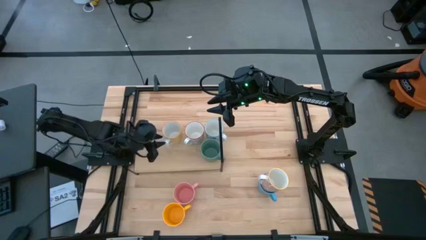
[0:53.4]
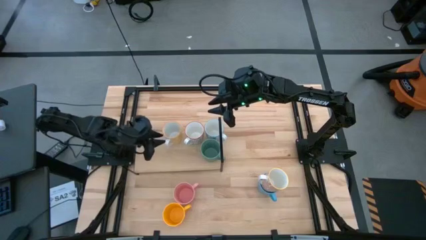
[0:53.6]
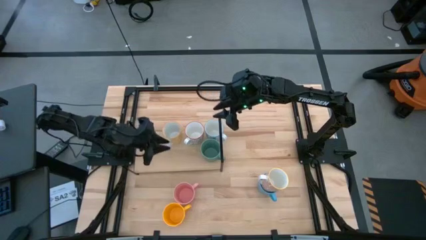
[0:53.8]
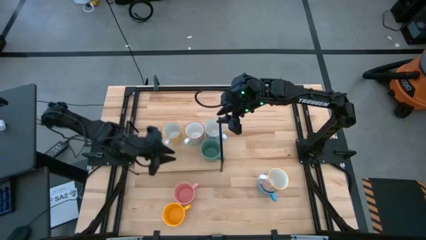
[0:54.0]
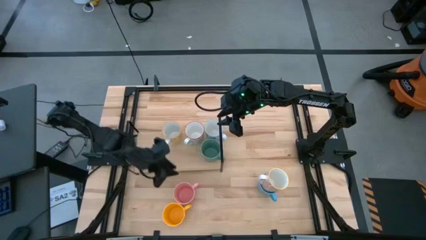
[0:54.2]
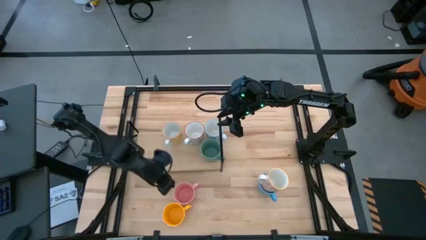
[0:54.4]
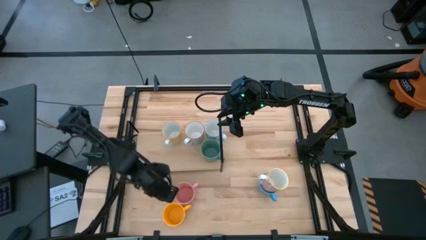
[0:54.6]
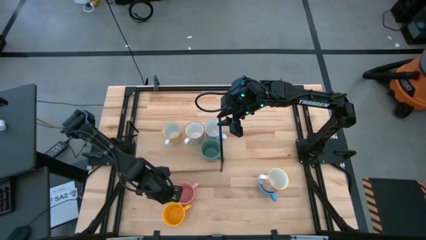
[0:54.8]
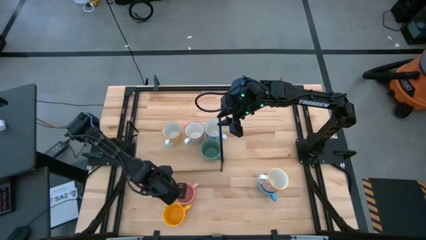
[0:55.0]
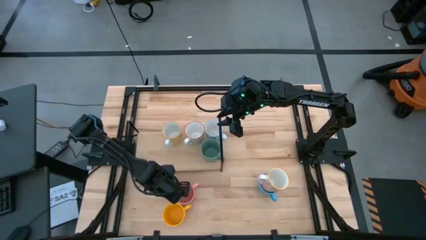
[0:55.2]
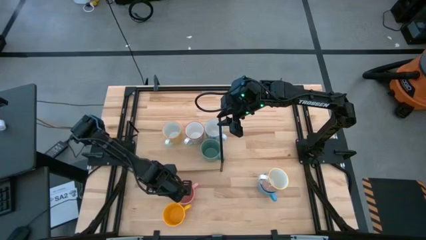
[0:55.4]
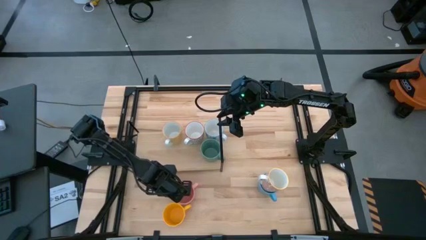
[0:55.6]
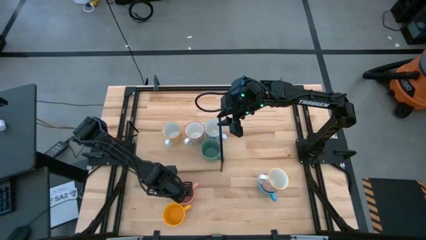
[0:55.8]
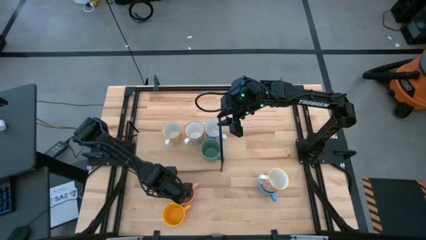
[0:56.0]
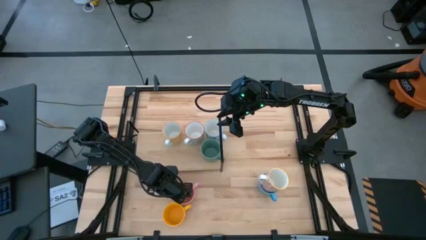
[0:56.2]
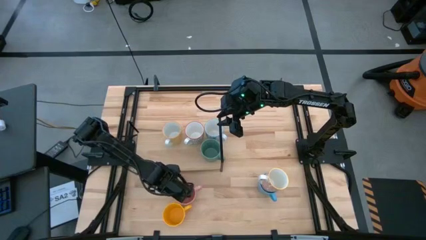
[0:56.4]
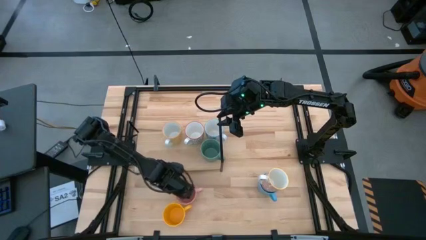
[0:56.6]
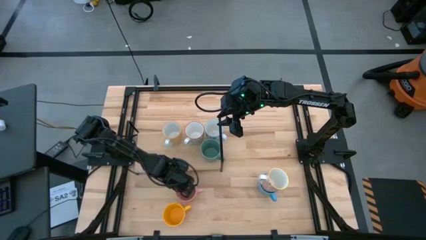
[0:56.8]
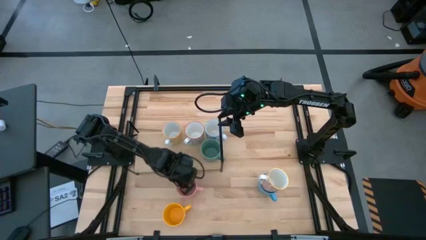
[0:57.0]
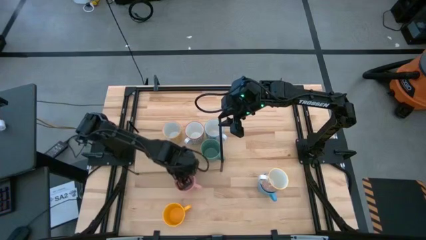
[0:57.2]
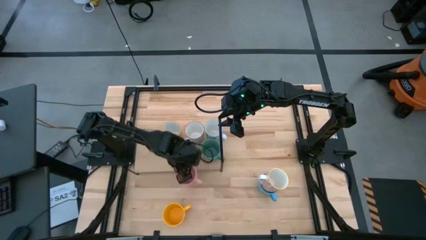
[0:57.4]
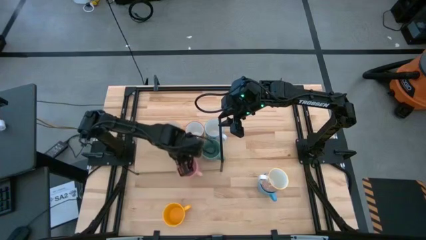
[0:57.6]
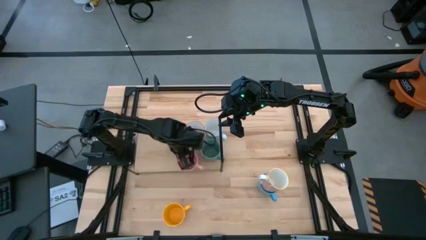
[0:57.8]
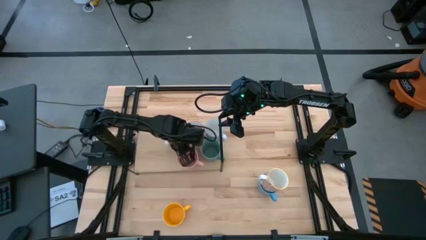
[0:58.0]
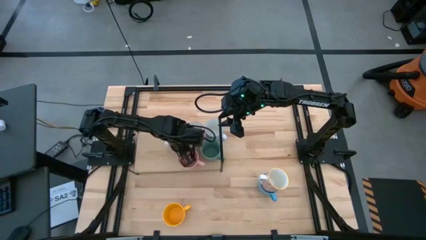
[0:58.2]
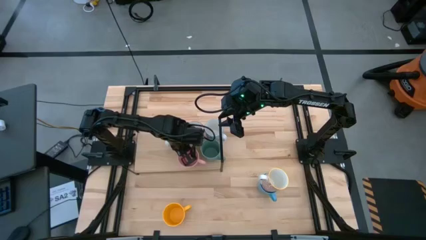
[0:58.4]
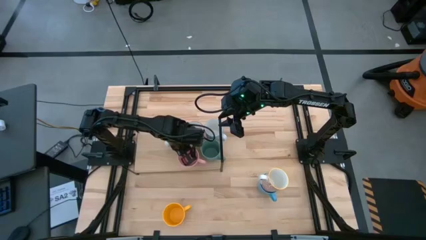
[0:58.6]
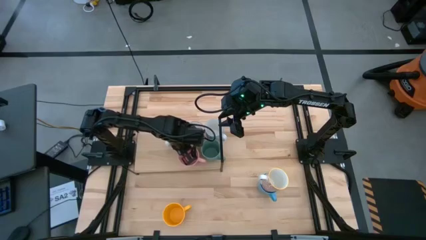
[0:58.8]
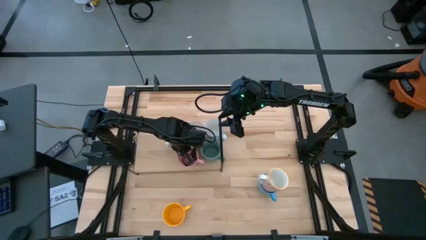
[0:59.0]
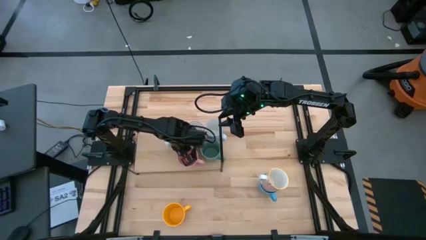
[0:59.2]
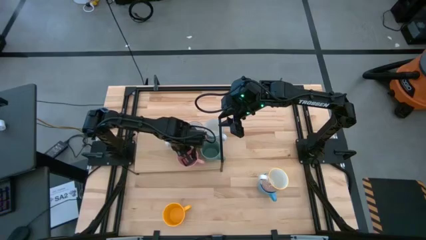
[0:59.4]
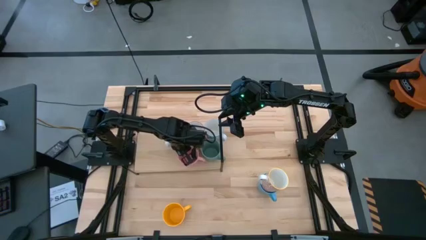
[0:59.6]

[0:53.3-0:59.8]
Task: Place coffee mugs
Put the pink mug on the shelf

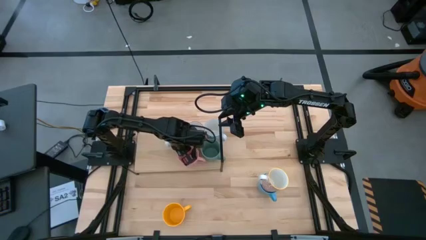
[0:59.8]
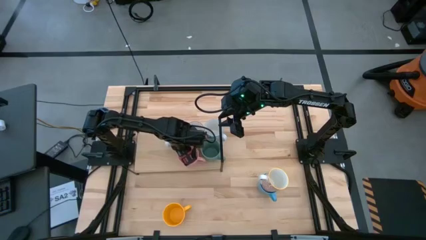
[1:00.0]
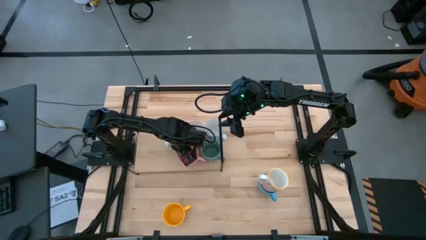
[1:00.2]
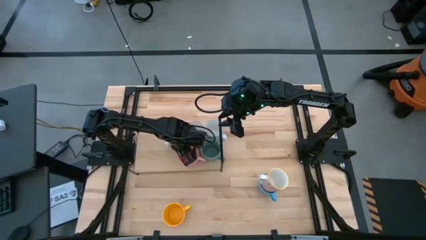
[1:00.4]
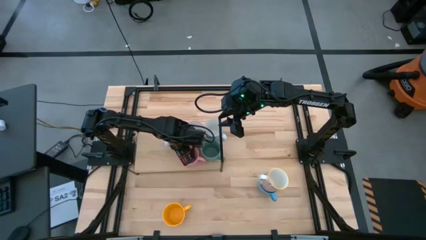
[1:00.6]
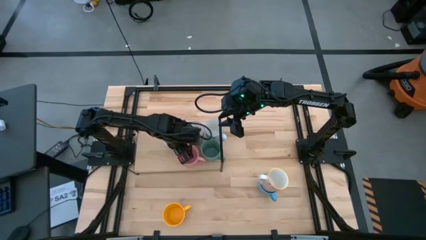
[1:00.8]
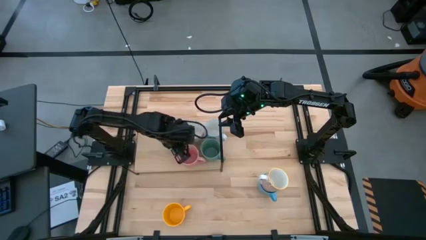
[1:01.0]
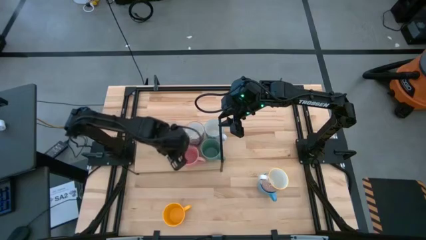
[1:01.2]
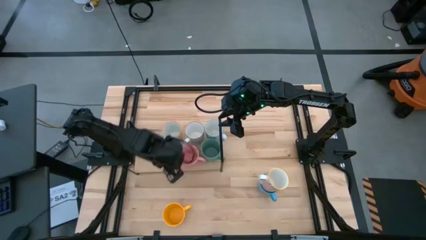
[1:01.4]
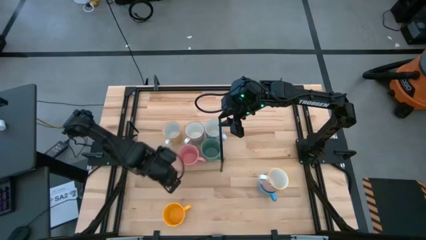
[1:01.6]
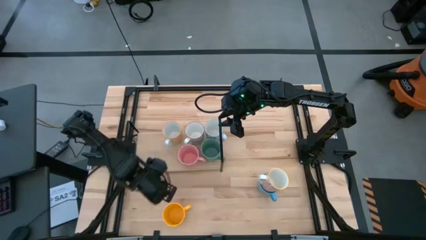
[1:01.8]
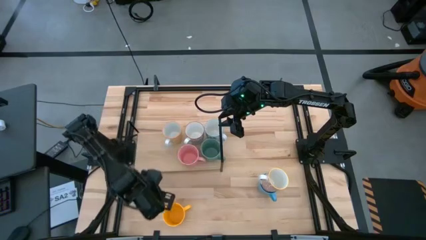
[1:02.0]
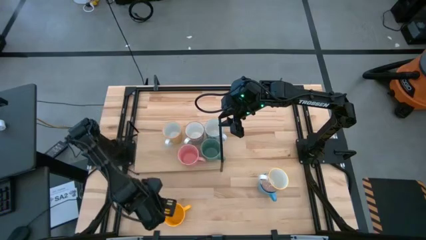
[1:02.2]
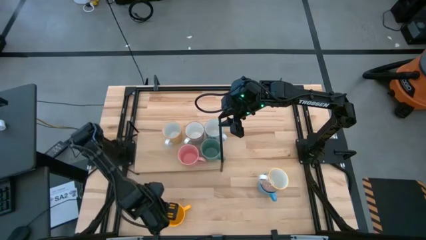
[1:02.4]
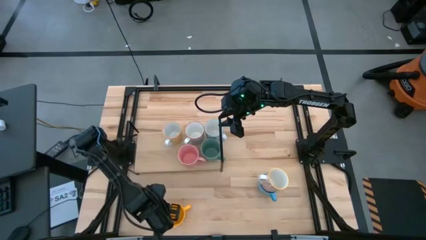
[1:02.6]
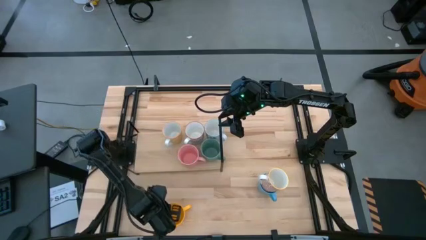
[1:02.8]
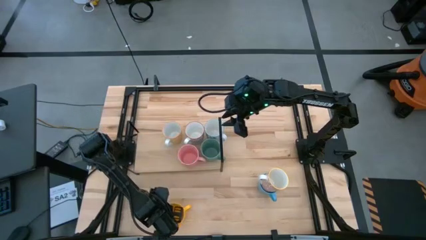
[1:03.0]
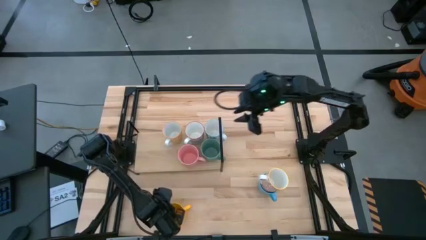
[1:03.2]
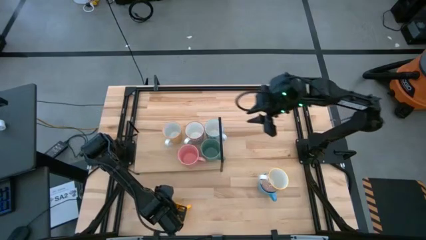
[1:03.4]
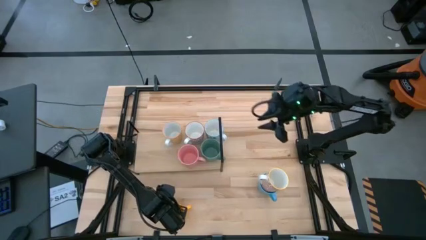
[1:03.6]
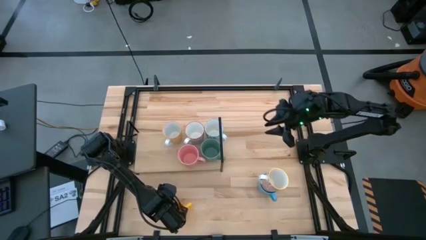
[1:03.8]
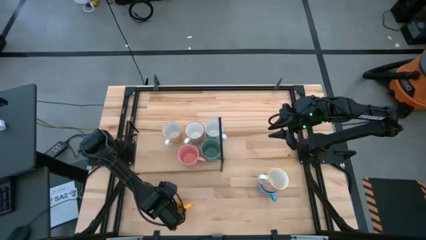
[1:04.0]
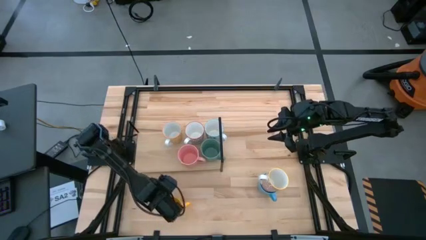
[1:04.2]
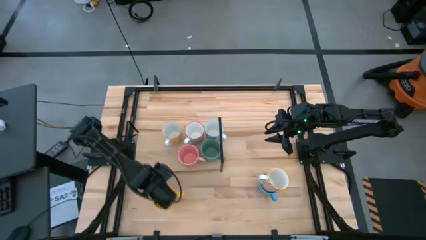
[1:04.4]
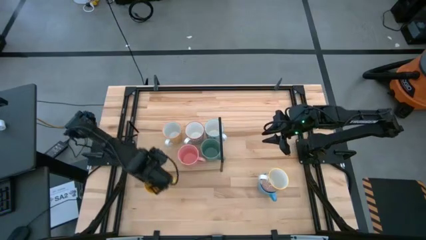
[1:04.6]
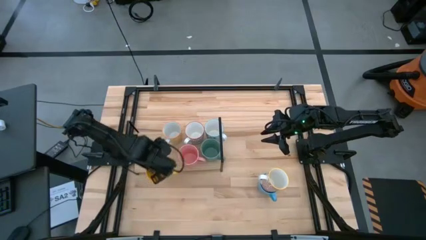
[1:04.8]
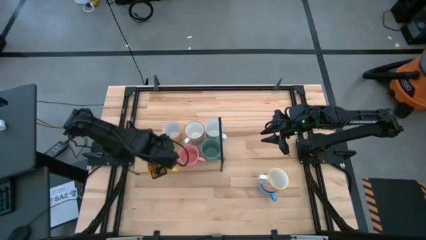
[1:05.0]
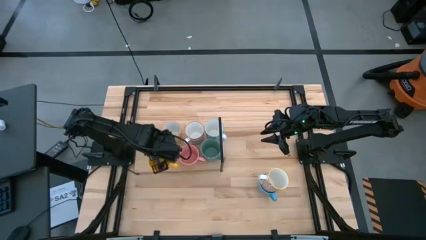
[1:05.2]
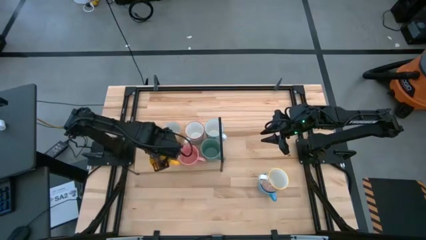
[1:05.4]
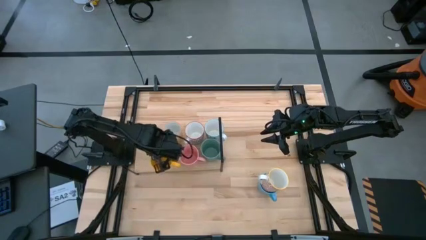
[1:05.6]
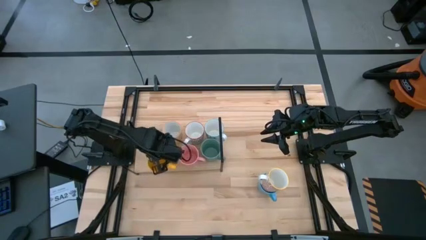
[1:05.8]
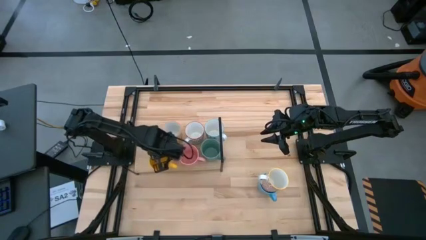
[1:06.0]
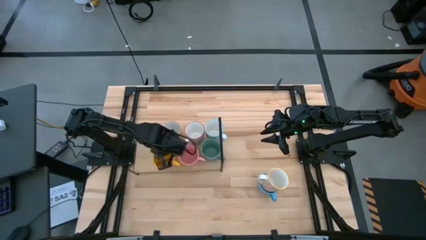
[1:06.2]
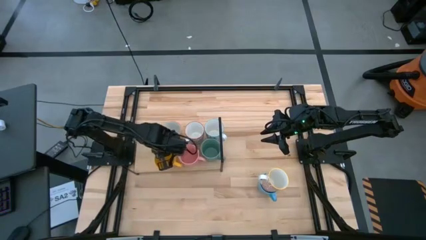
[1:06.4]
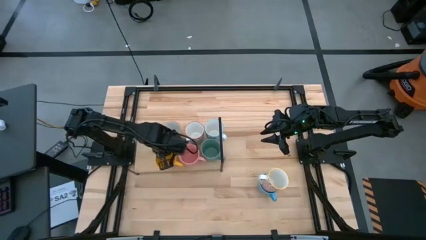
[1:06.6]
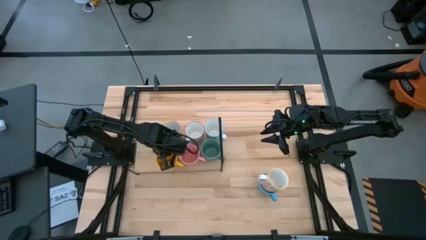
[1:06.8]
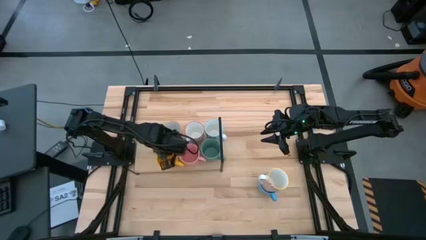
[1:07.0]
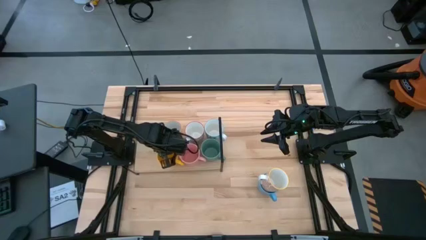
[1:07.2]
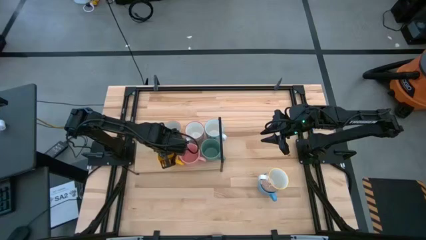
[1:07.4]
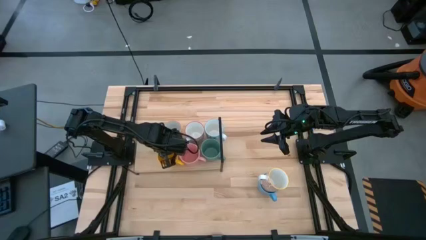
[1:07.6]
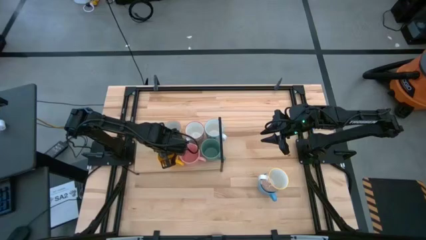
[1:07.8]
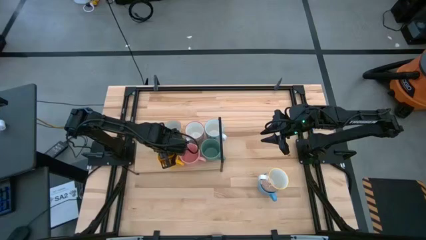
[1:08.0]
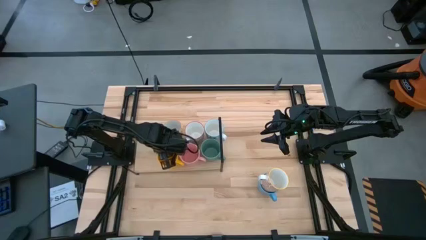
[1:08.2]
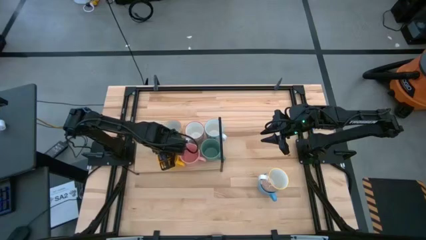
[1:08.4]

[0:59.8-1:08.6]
Put the yellow mug on the shelf
